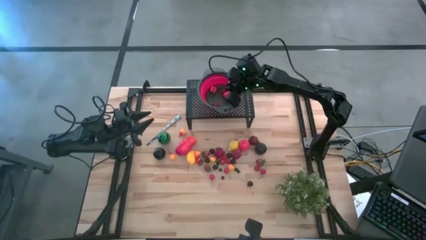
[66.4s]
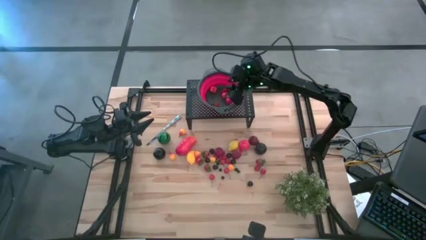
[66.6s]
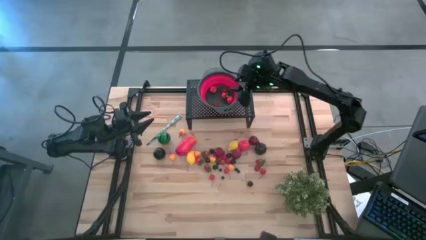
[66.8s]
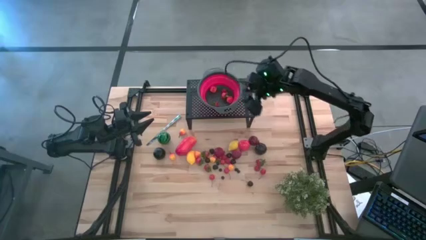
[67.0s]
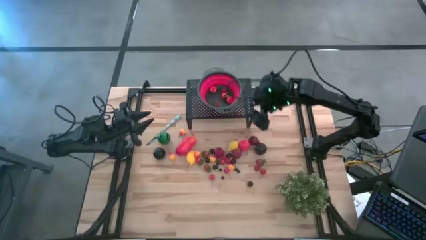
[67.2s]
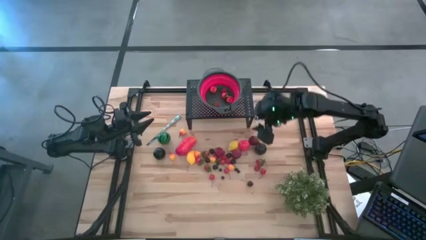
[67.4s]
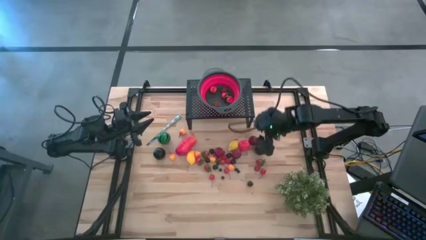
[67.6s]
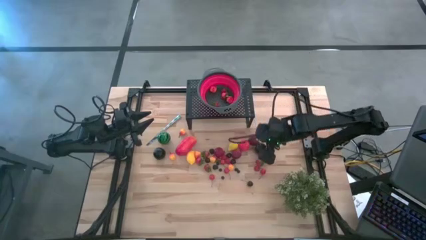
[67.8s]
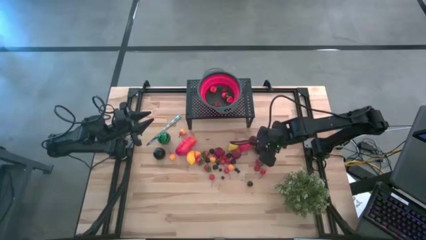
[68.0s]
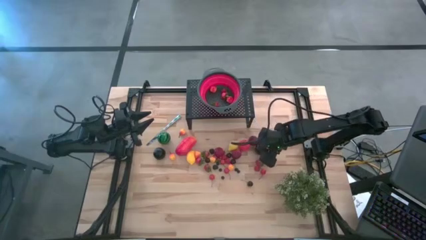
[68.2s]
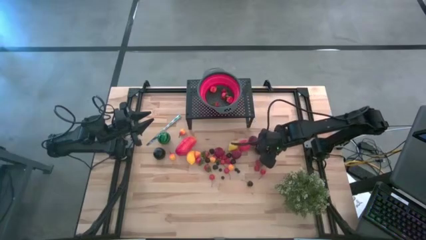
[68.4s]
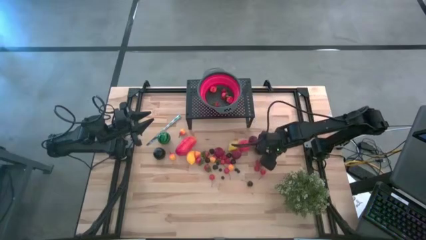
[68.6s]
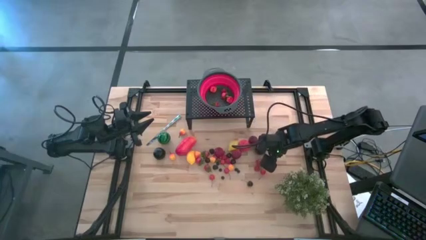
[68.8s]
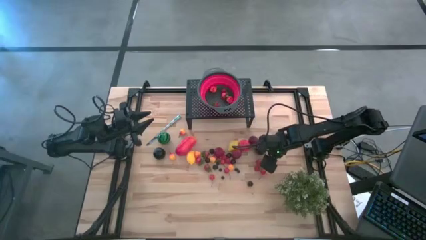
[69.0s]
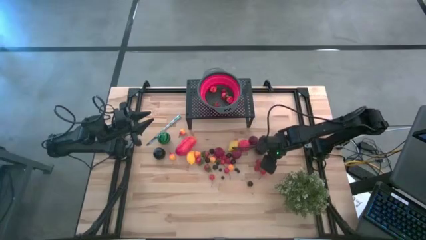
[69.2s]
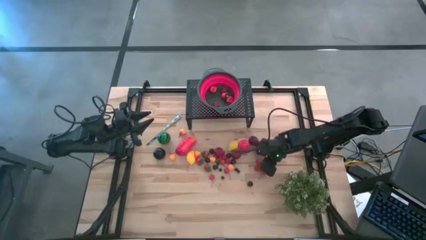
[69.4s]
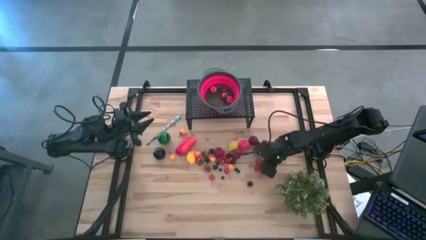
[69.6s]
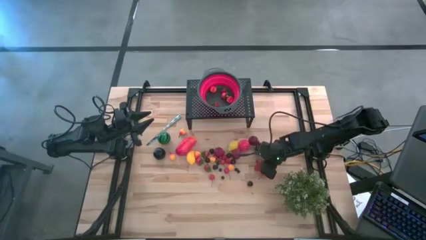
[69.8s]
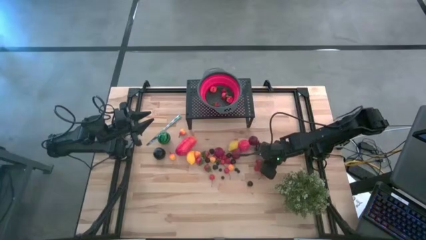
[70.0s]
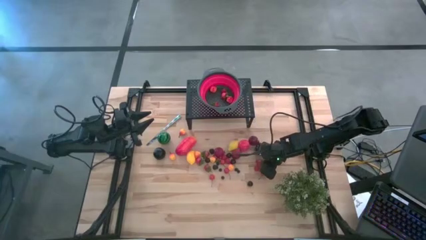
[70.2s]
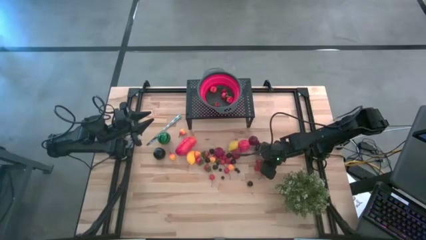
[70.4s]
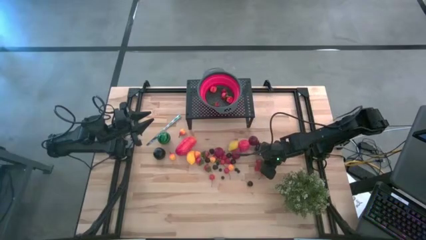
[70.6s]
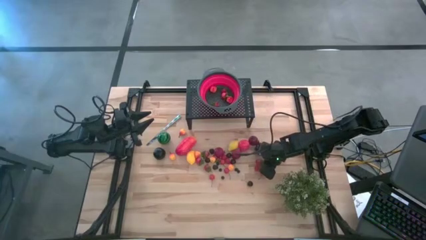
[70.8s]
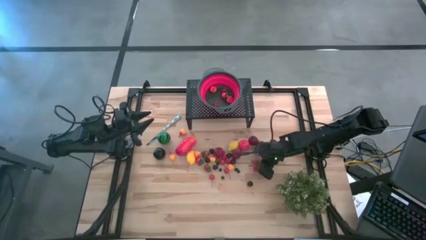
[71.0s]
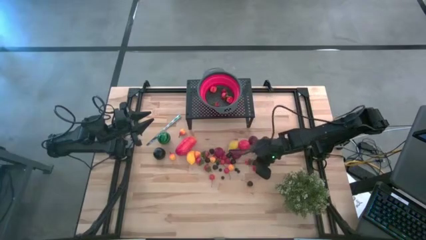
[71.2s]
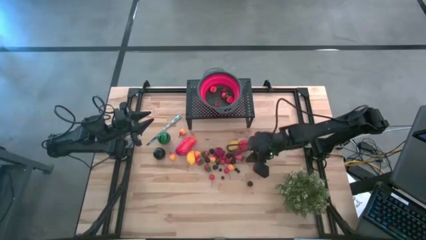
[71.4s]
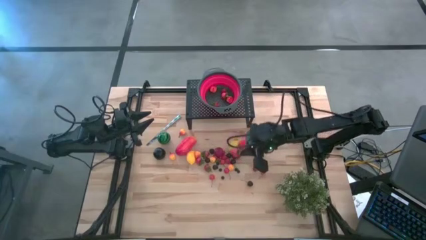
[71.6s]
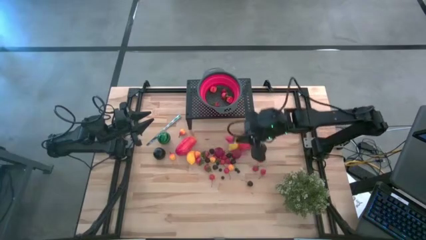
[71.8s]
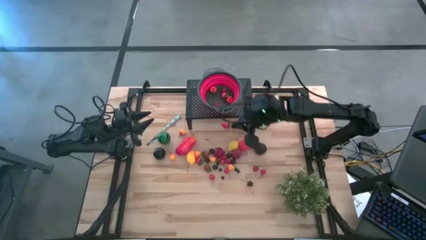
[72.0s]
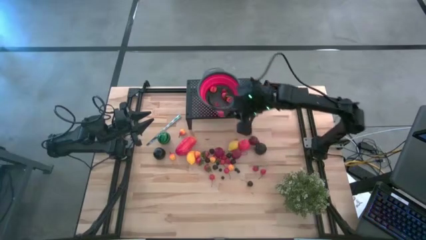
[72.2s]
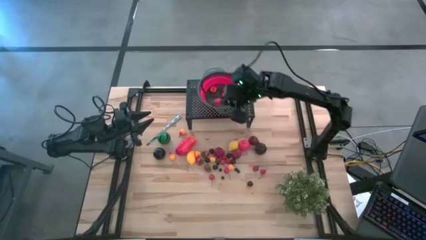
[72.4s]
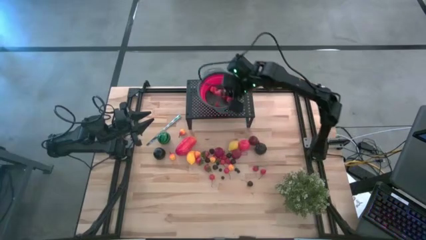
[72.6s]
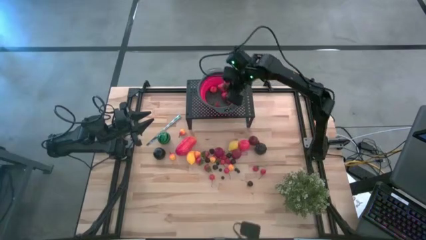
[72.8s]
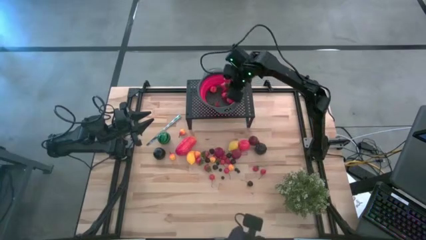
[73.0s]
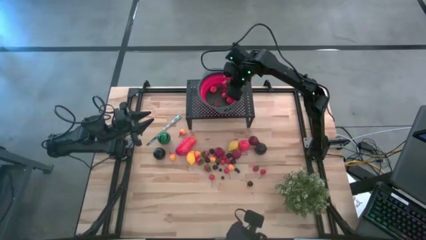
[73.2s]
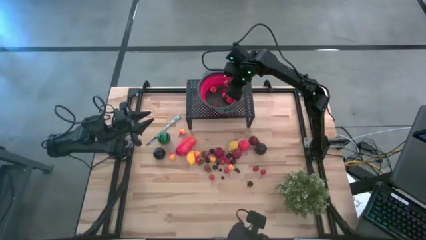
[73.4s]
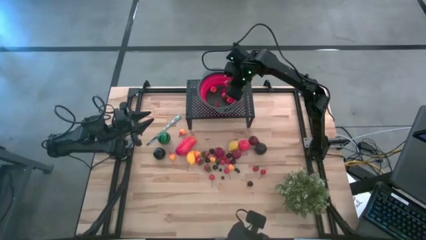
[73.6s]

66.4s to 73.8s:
Task: Pick & Place Fruit
Put the strawberry in the red colander on the shelf

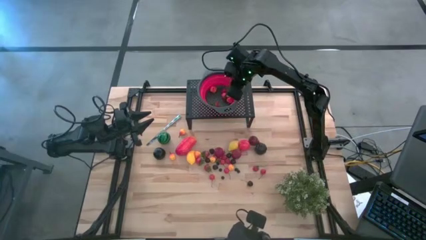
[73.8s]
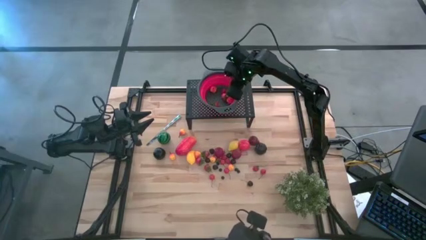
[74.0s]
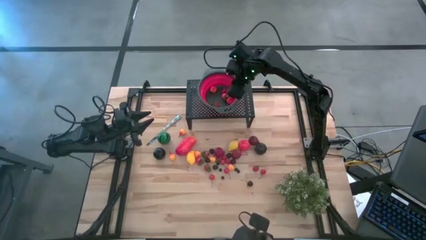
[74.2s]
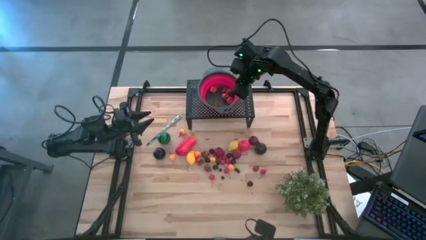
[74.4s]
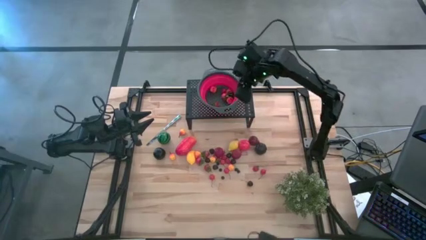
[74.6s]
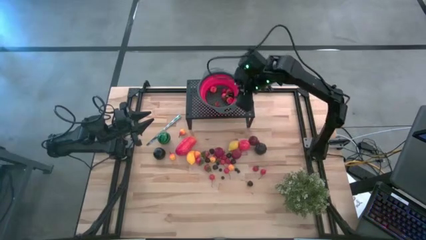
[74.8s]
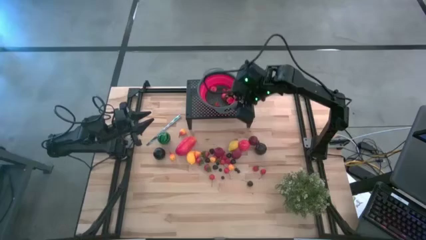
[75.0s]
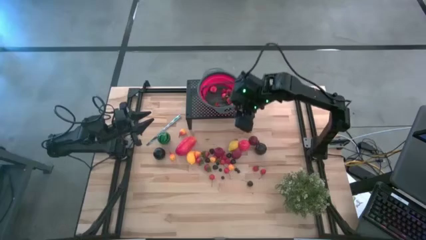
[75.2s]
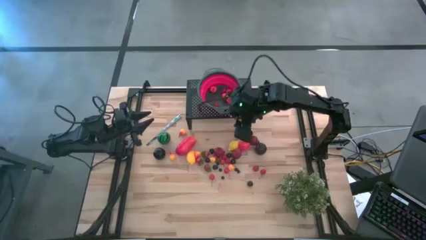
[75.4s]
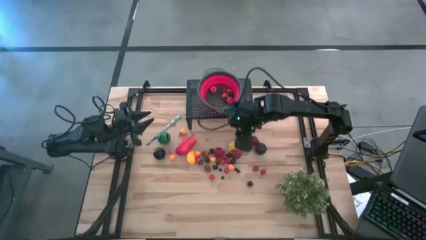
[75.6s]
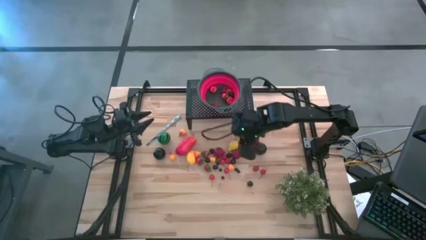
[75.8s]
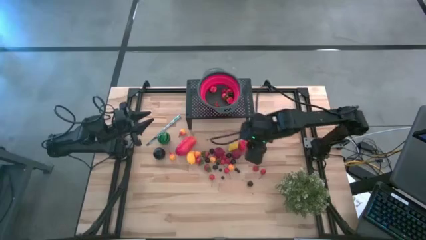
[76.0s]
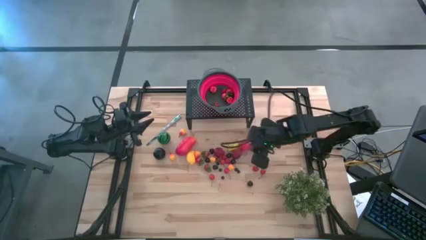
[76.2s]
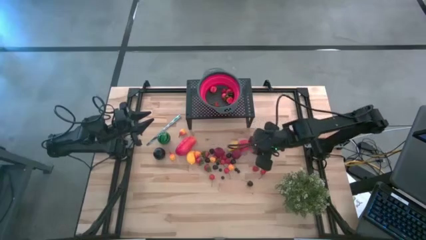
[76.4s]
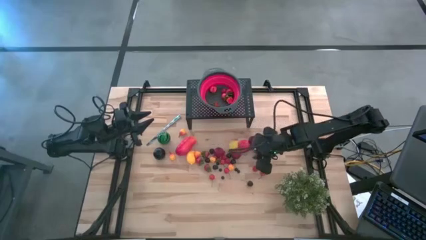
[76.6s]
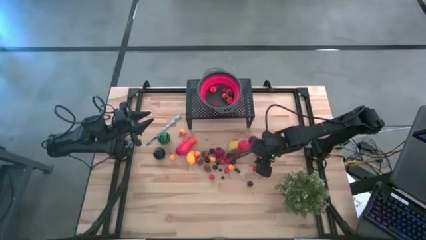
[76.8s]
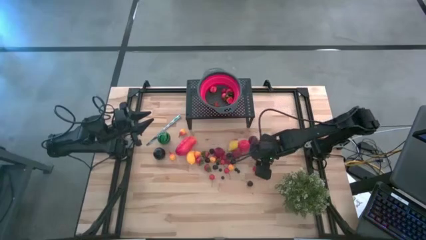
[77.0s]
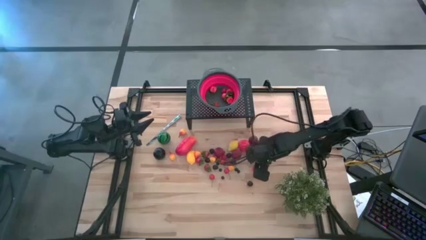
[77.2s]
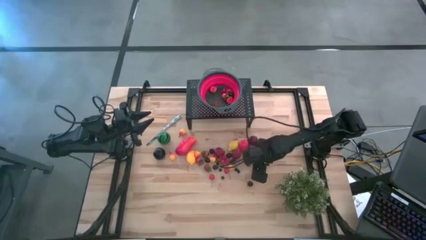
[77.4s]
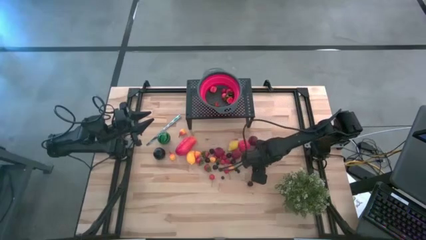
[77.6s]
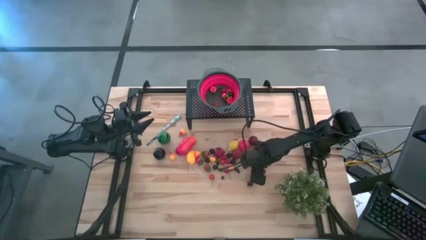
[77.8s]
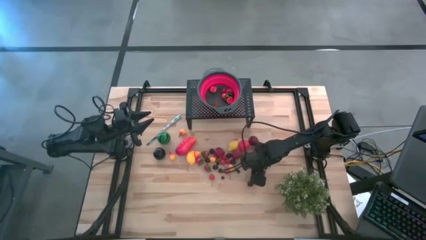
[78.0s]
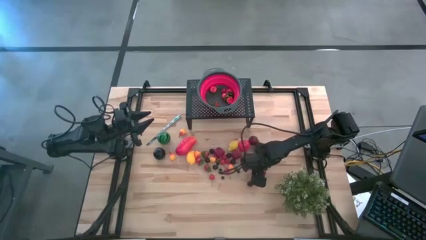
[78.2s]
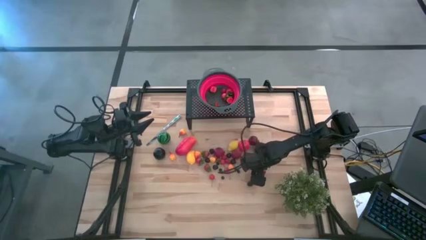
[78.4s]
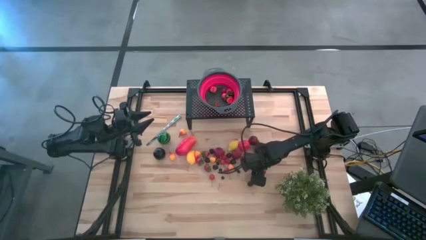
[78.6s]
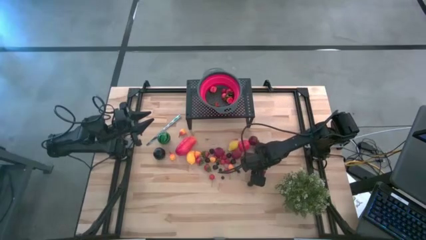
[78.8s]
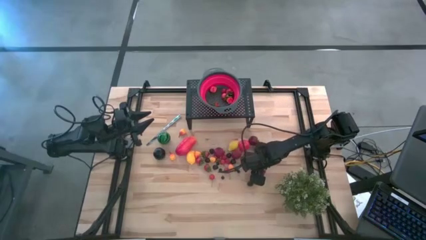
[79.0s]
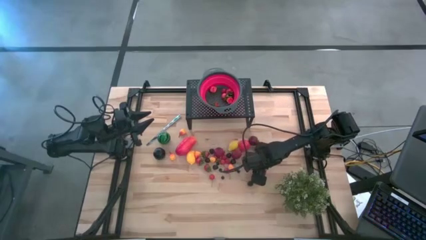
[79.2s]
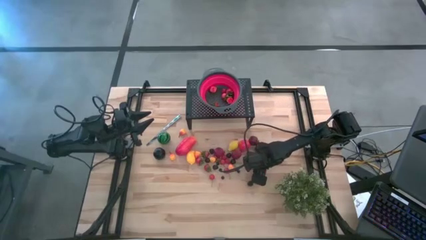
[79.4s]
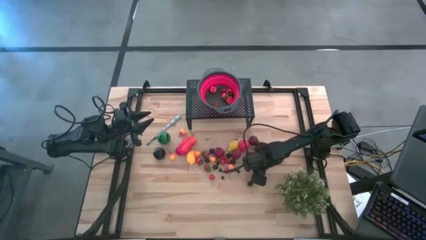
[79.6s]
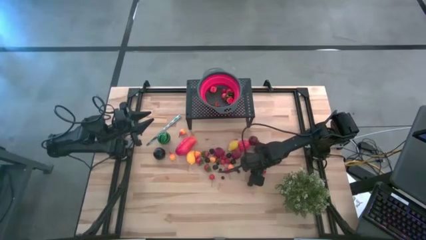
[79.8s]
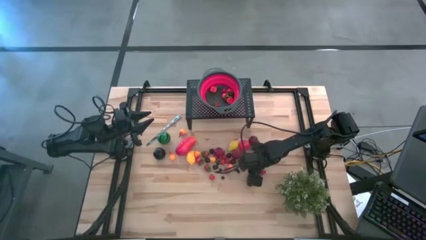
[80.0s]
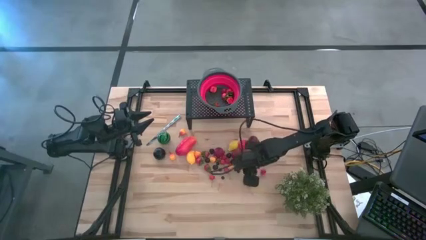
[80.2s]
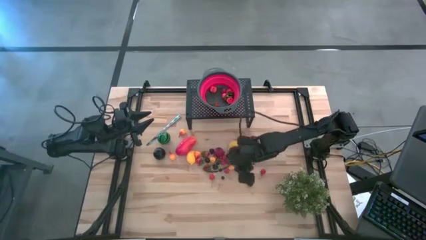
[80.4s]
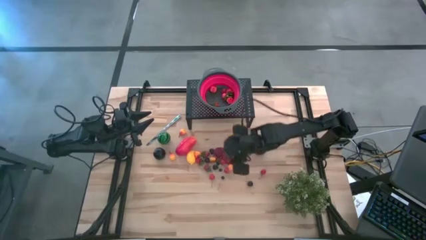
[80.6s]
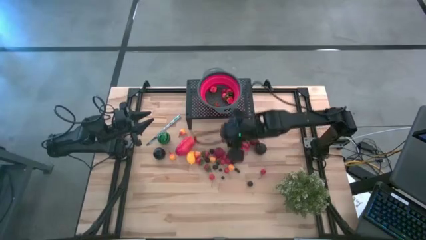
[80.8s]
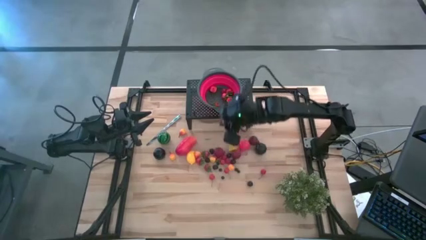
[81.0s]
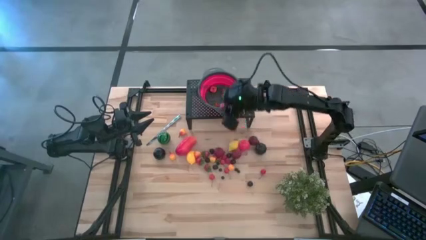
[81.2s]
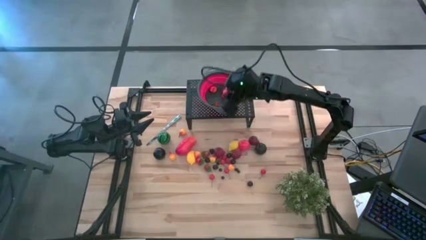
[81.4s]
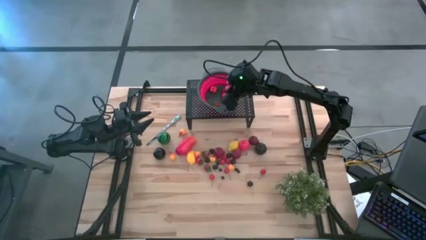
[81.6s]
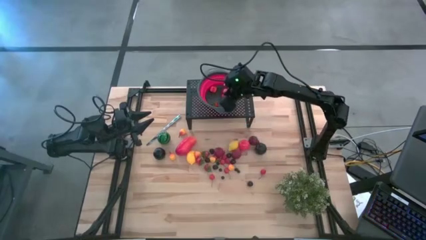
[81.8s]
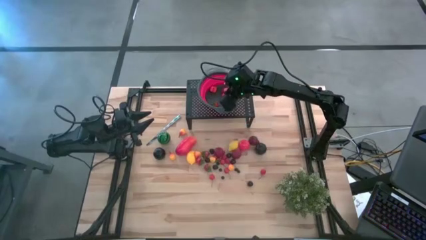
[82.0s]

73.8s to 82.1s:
Put the strawberry in the red colander on the shelf

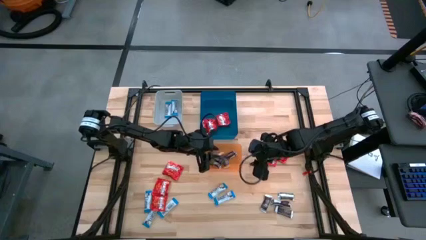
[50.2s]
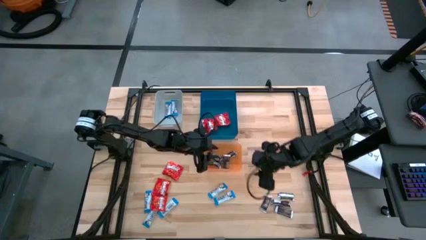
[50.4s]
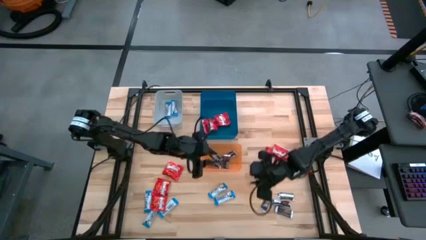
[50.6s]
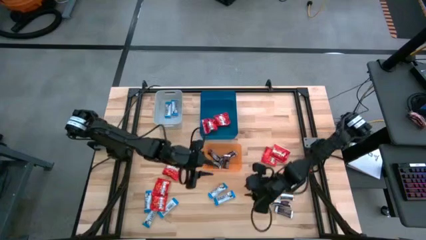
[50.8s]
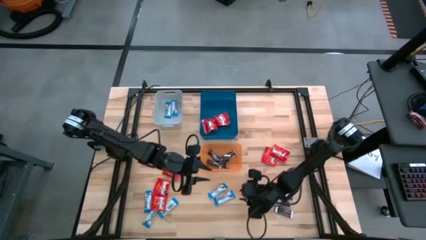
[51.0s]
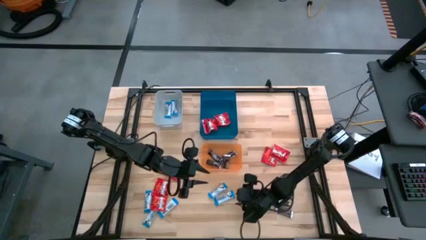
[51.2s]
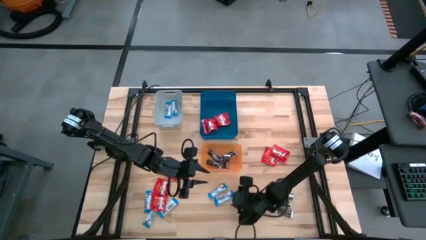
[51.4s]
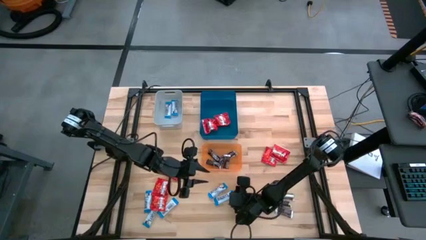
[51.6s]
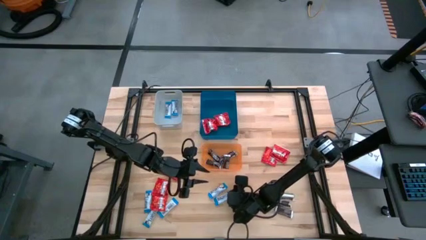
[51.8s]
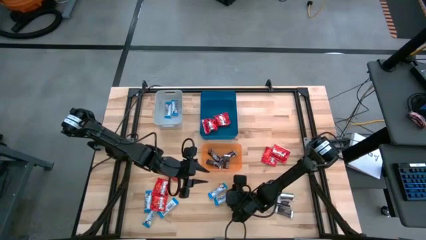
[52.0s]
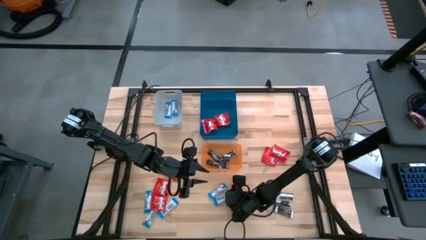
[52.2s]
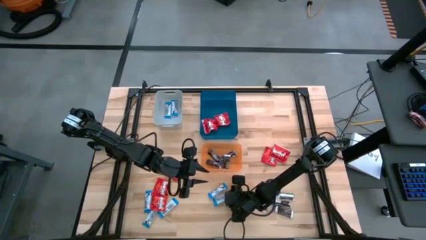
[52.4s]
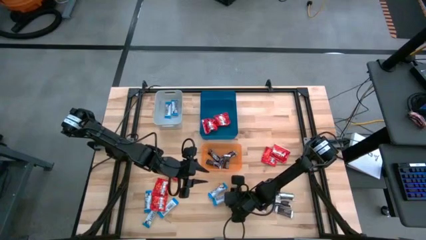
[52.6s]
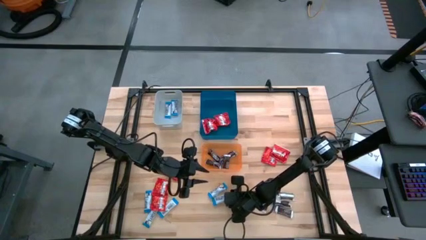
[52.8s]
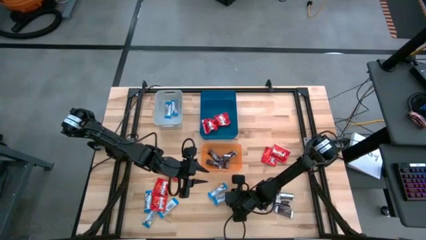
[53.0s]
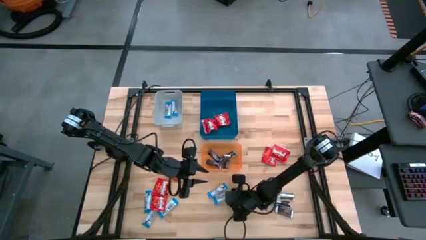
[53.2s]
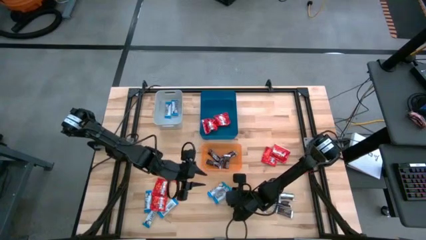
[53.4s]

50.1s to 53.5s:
Task: Sort candy
Put the blue chocolate bar into the gray bin
